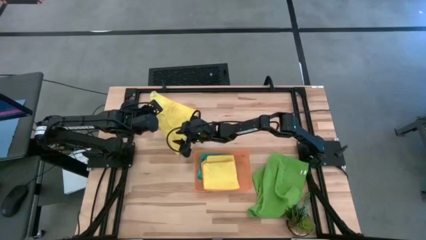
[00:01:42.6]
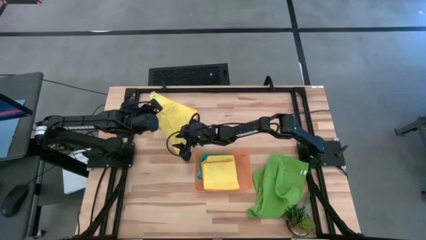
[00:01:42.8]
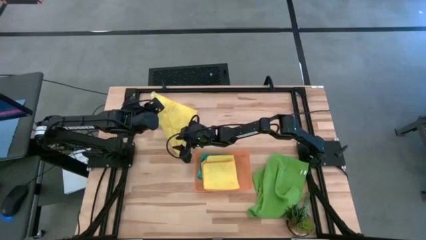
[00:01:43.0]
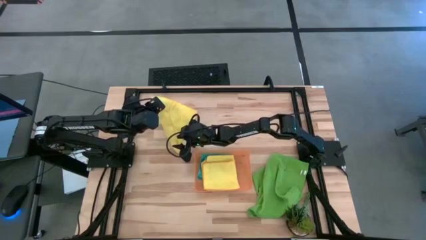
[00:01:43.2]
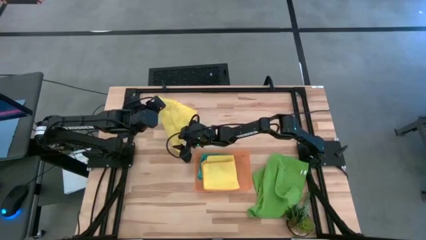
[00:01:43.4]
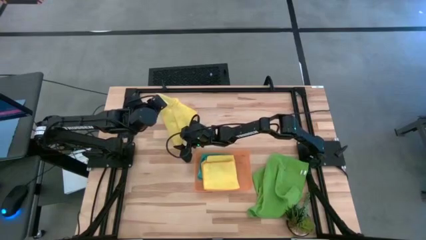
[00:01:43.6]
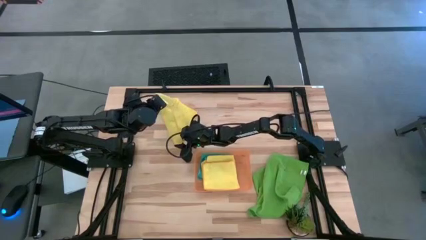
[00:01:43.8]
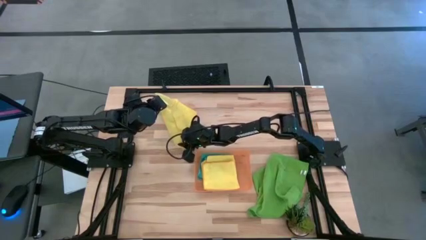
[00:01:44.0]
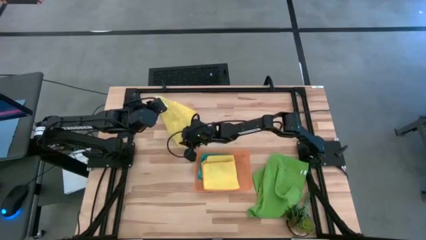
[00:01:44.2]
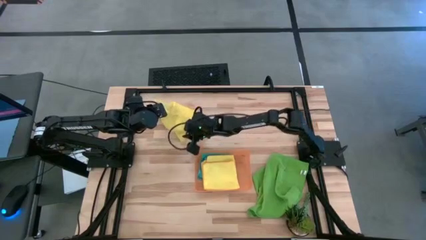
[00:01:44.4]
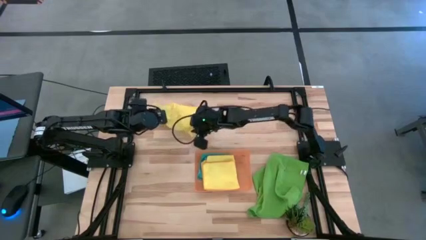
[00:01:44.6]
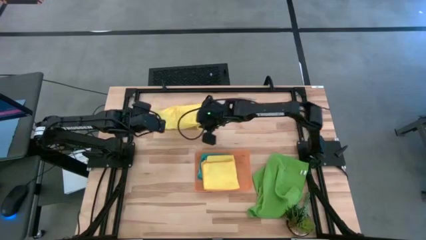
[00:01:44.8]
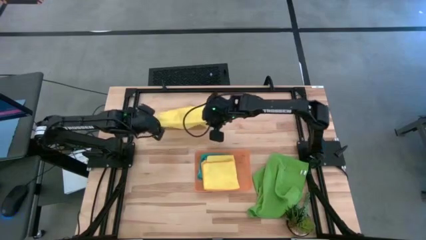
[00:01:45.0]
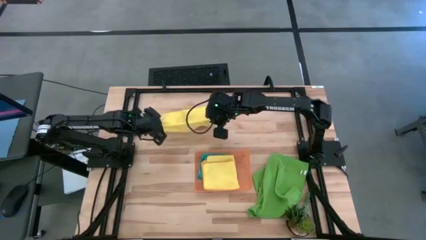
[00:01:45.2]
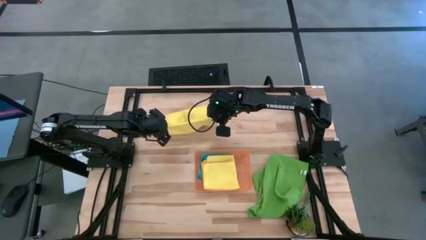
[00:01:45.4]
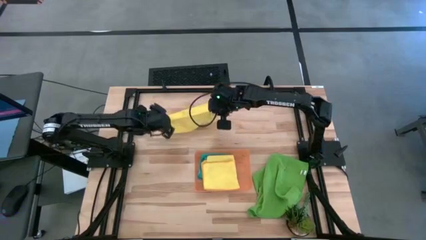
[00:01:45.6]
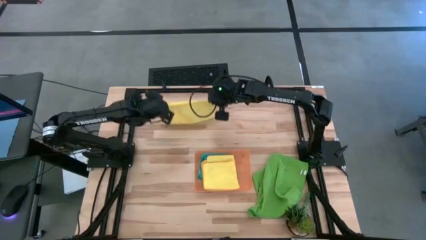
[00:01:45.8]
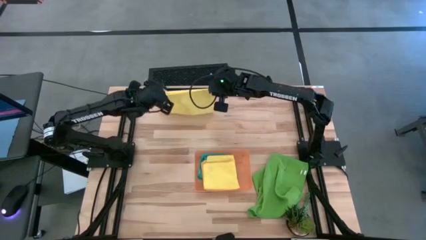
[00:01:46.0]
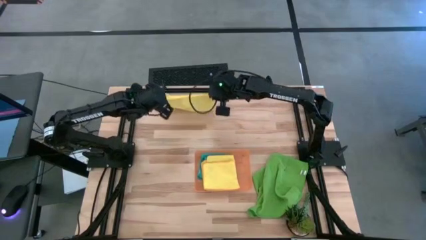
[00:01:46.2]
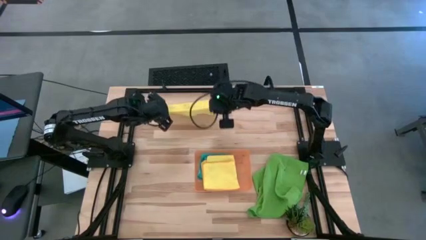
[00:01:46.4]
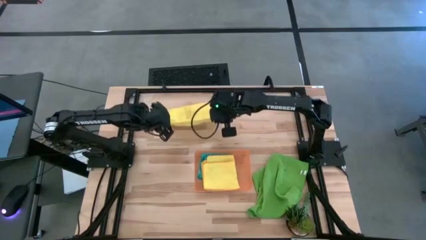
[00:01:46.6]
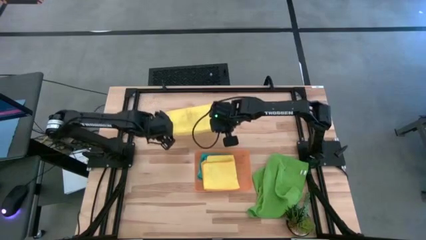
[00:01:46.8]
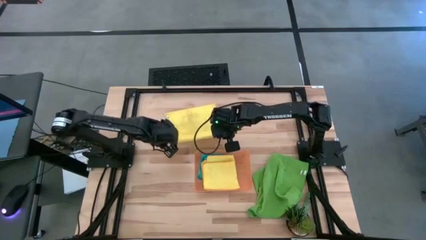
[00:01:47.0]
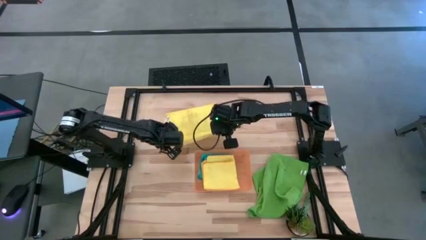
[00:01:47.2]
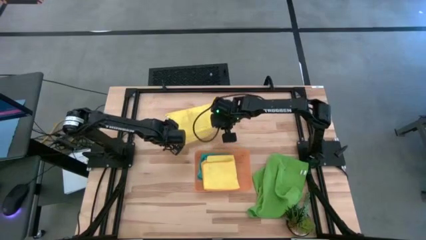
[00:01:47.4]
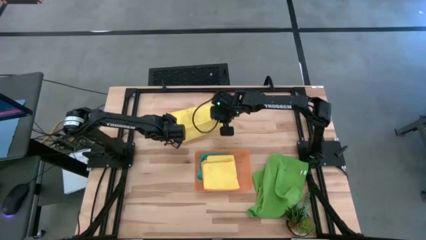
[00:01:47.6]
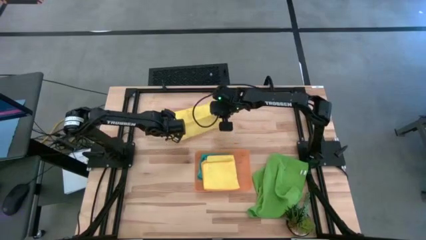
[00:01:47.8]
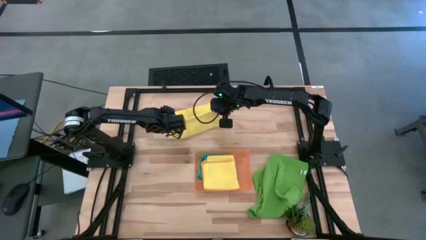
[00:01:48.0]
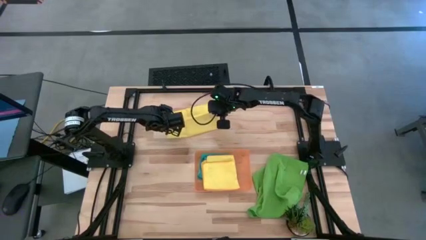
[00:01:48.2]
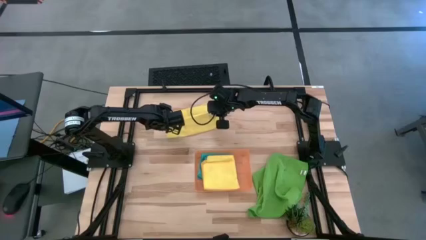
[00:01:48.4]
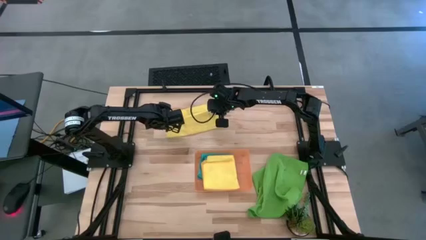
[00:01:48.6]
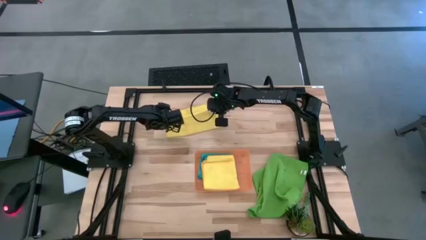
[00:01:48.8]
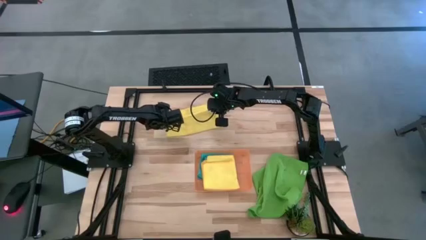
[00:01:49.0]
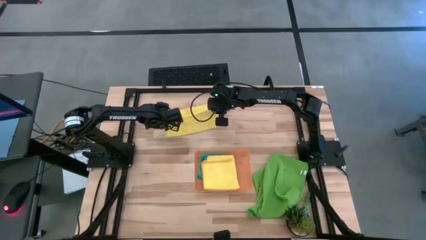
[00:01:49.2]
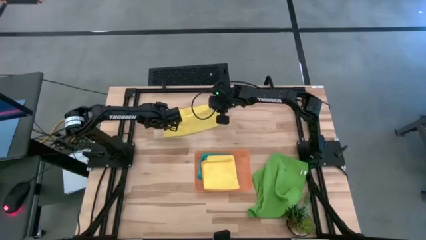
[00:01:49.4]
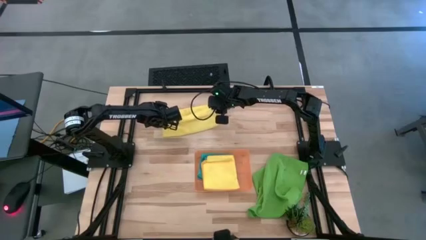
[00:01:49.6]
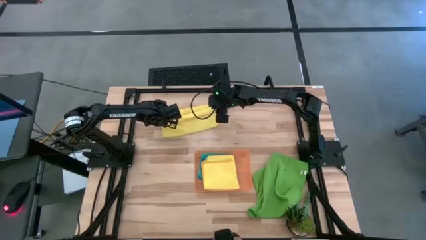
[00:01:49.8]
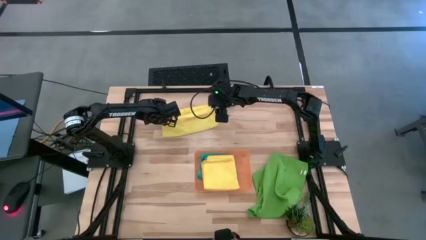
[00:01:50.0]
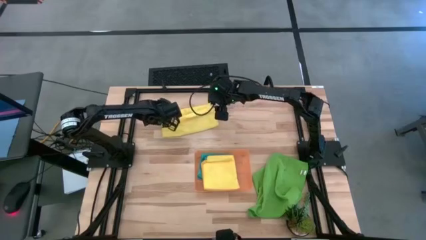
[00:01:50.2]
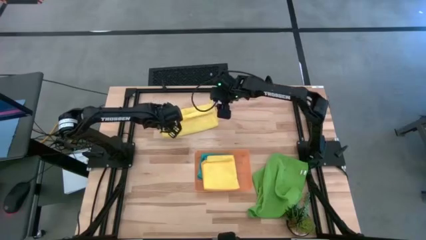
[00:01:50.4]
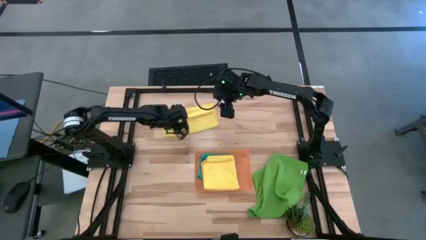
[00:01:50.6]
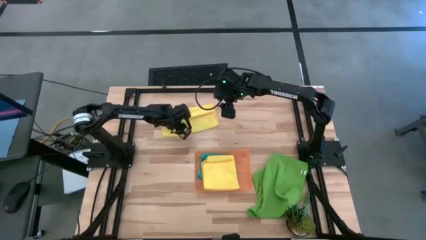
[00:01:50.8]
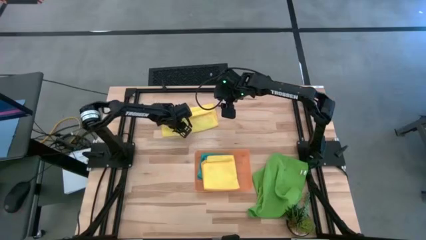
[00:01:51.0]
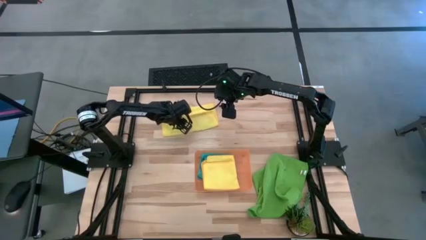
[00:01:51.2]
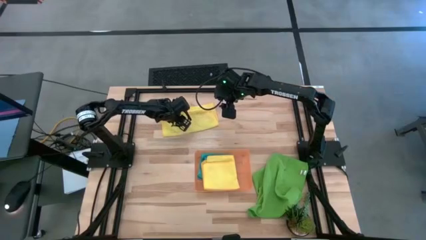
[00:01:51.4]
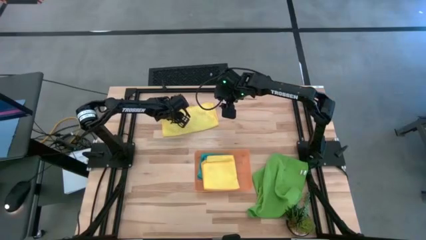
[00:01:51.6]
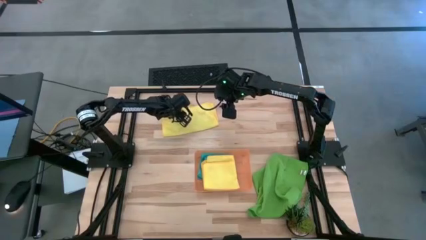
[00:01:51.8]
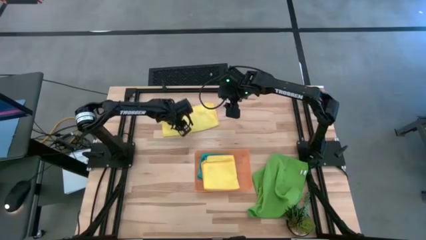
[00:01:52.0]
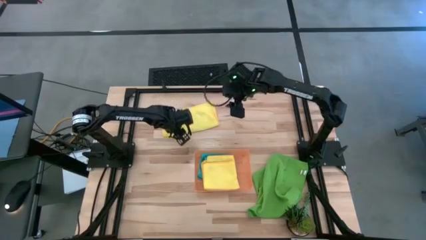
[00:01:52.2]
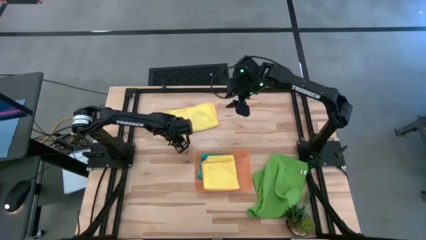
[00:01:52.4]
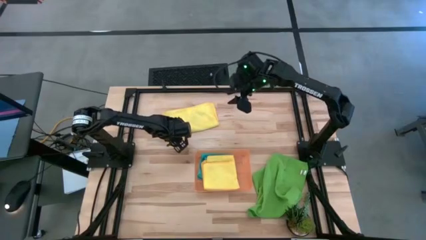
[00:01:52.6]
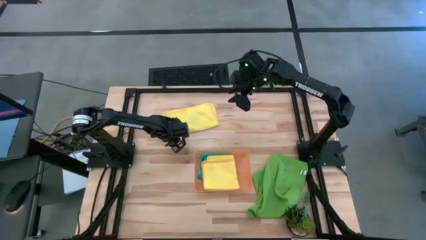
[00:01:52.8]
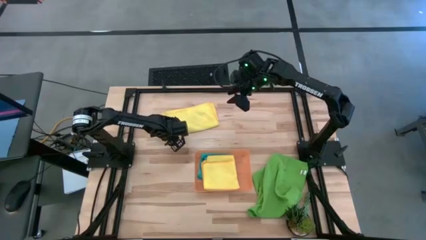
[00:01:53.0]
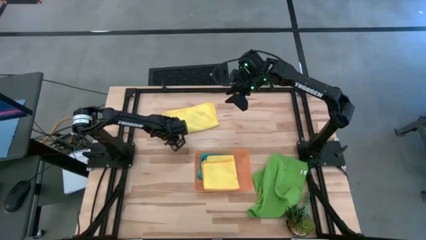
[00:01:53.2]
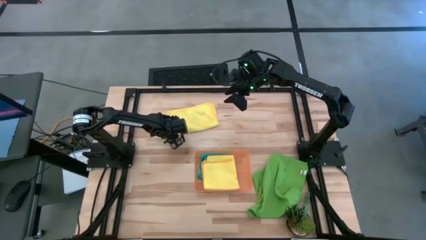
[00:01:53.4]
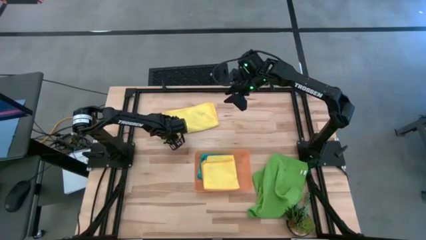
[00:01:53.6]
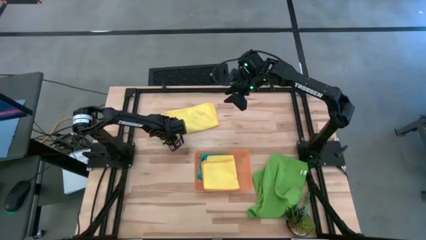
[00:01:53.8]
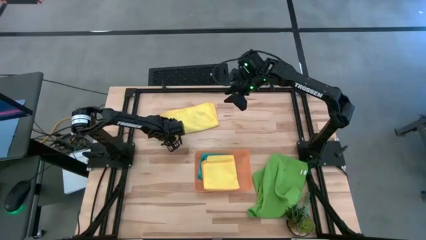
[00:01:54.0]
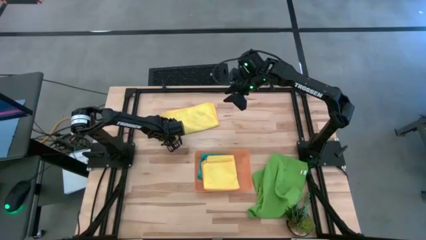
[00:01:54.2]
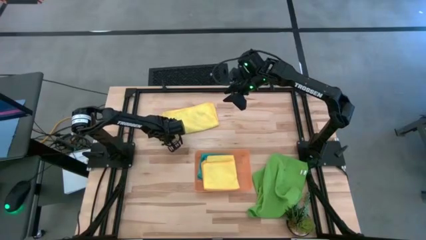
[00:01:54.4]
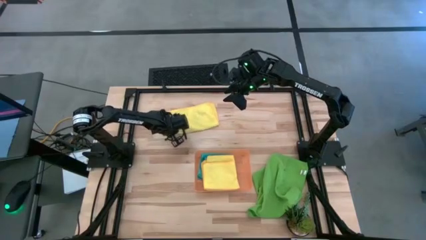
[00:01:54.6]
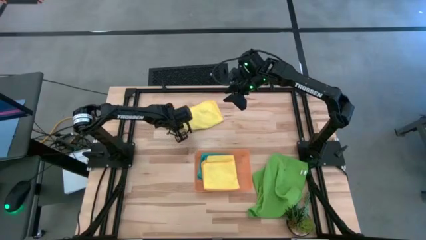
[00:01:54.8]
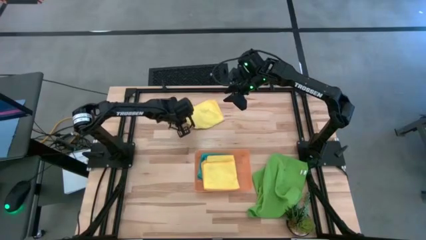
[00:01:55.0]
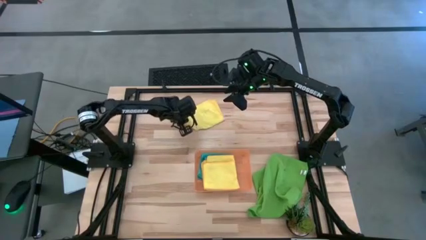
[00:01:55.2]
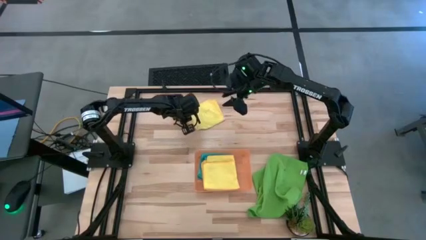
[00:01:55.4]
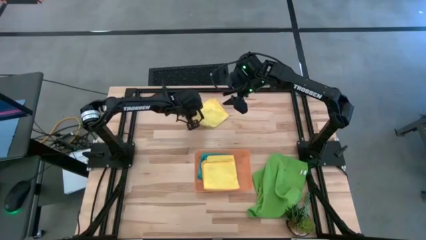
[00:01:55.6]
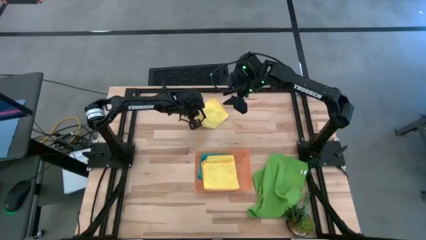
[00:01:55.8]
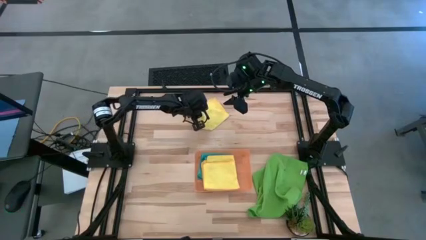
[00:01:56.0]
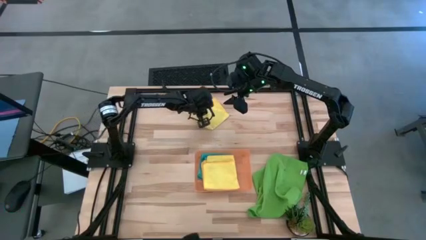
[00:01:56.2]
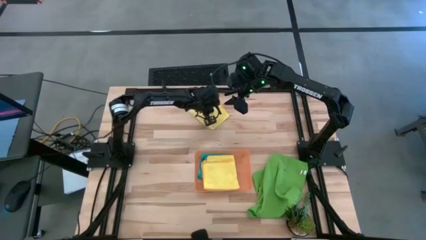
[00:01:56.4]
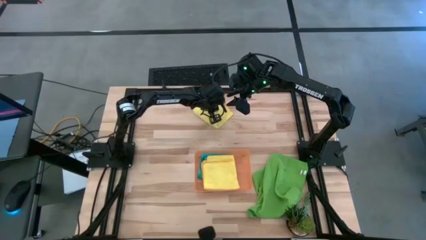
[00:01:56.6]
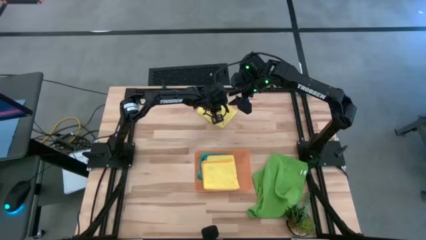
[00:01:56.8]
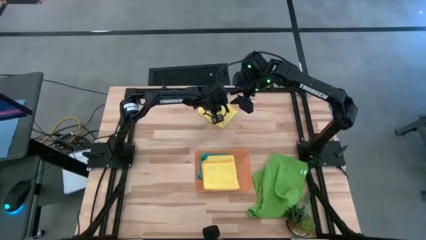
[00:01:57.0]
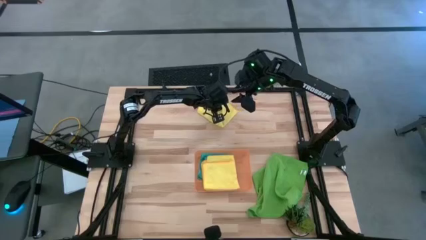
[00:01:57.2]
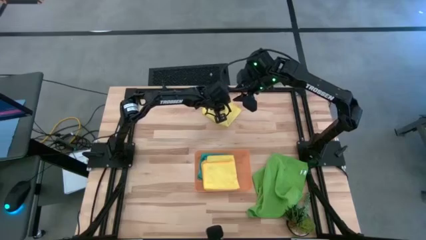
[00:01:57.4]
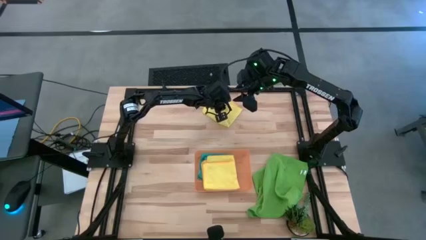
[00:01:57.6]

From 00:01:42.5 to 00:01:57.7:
Task: Fold microfiber towels
Fold the yellow towel
